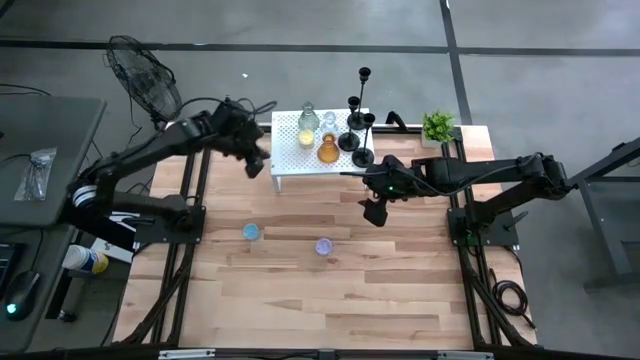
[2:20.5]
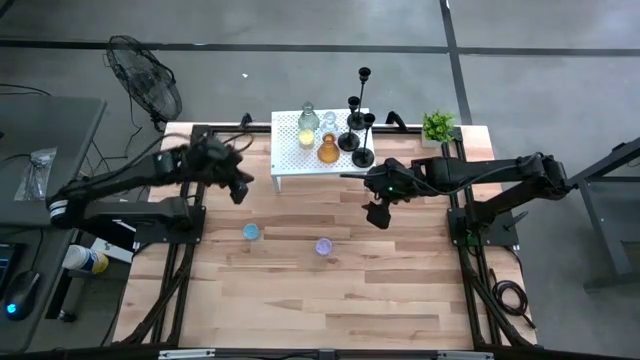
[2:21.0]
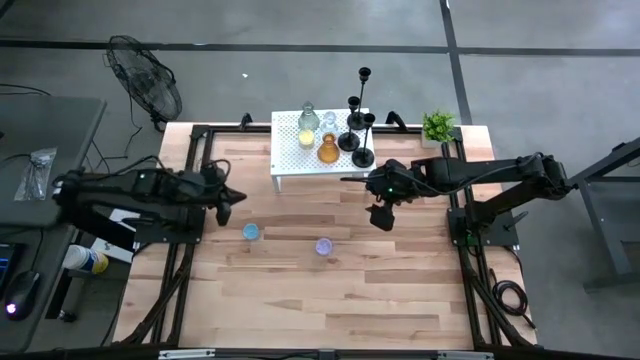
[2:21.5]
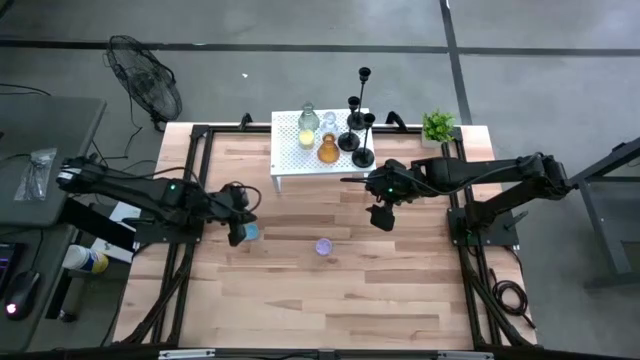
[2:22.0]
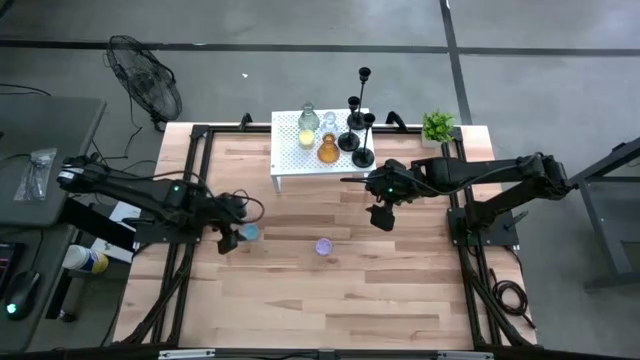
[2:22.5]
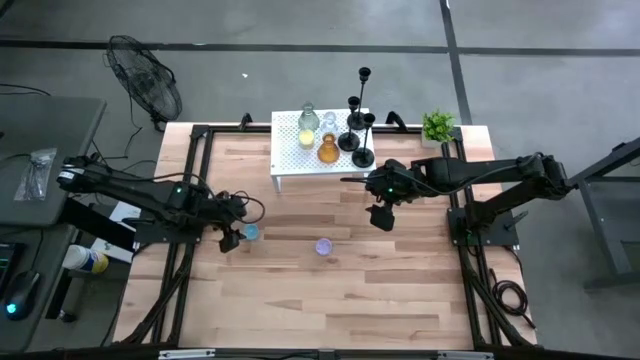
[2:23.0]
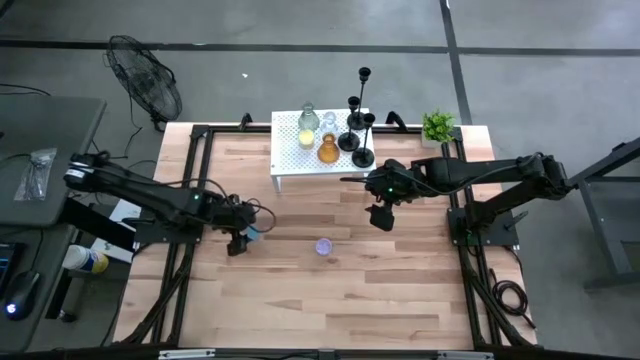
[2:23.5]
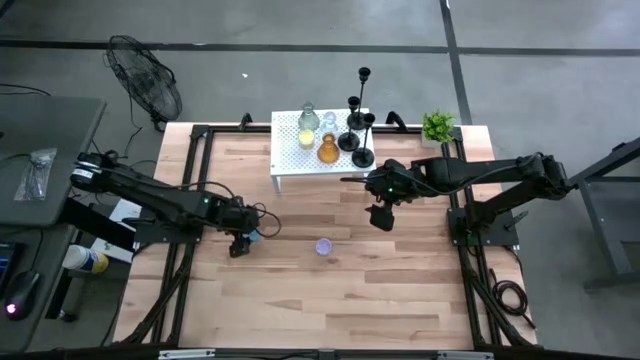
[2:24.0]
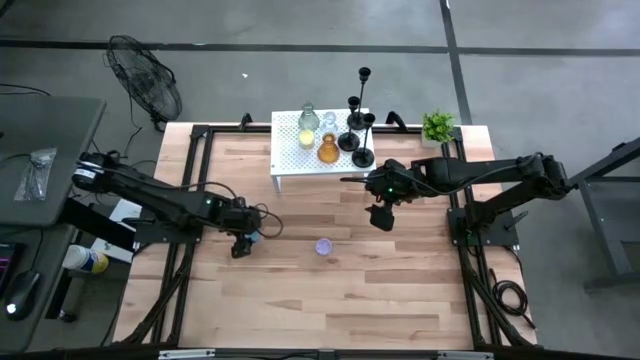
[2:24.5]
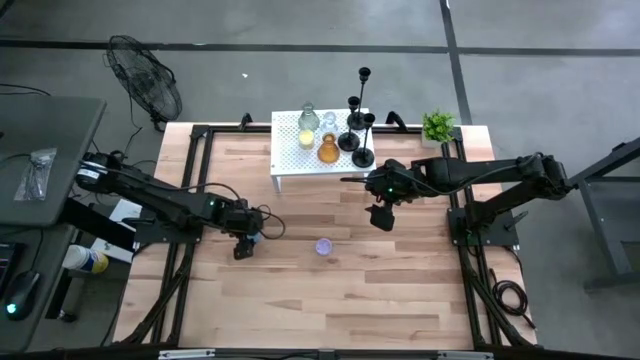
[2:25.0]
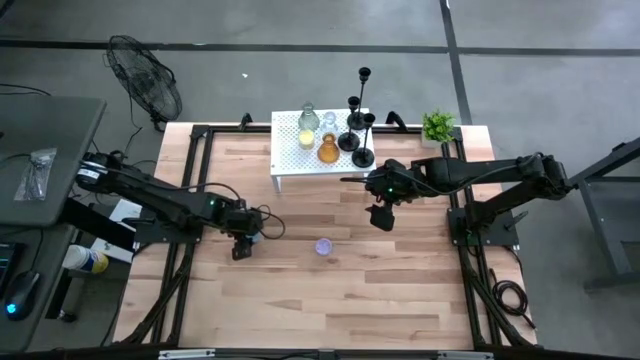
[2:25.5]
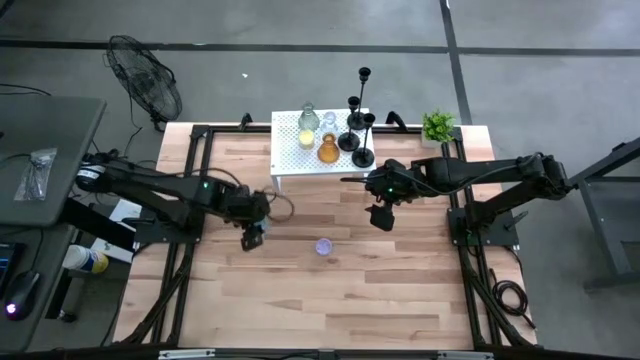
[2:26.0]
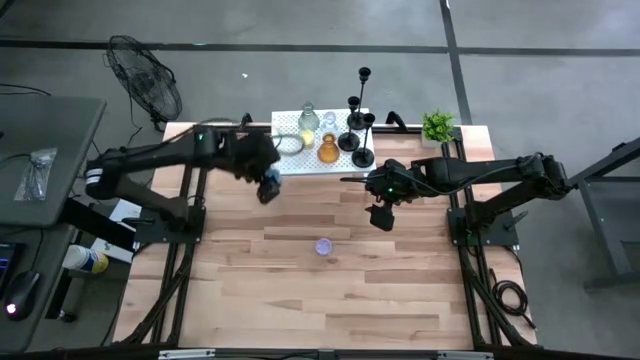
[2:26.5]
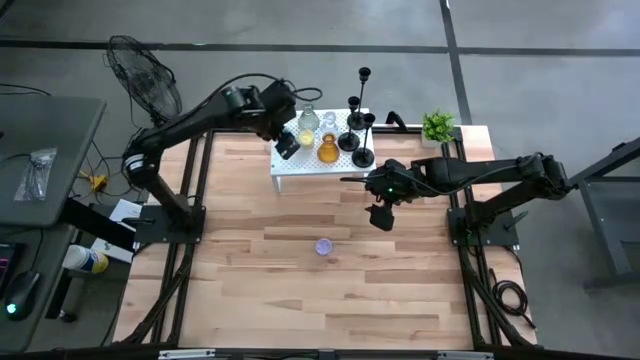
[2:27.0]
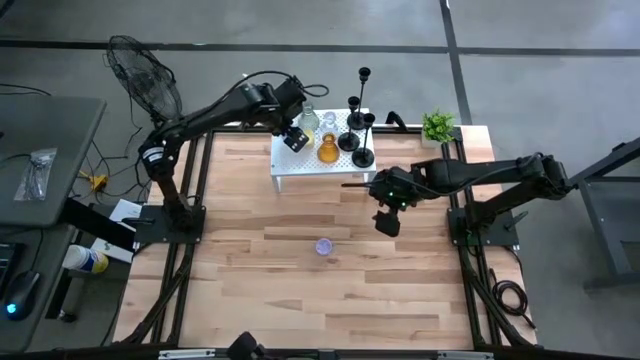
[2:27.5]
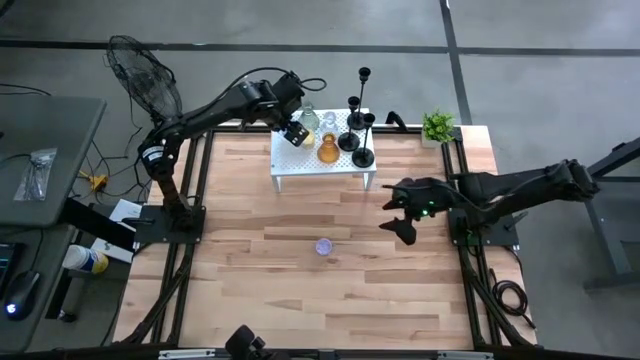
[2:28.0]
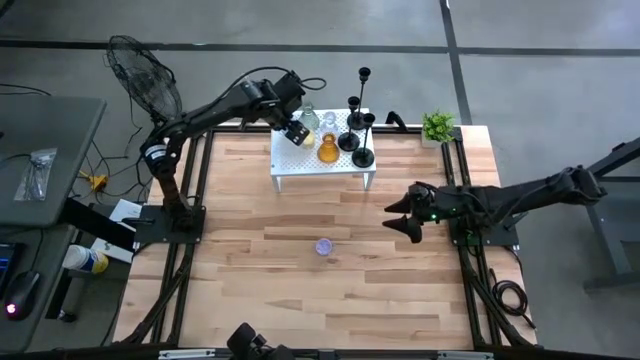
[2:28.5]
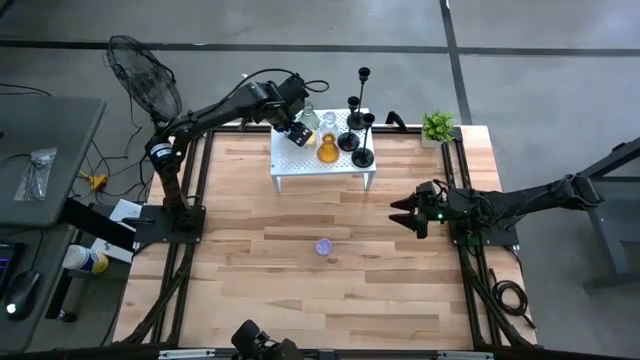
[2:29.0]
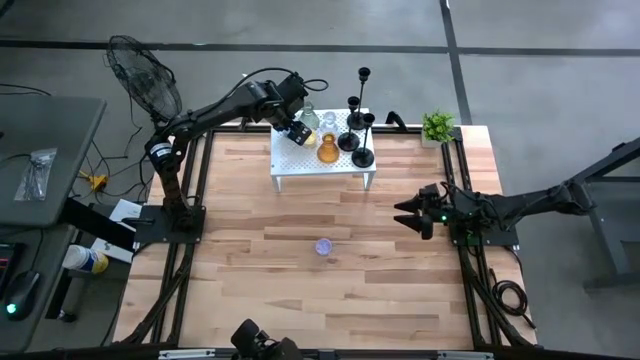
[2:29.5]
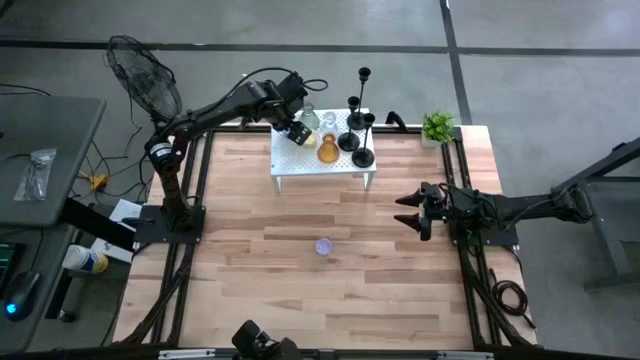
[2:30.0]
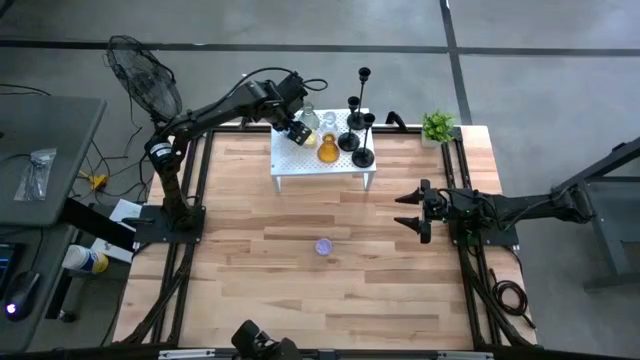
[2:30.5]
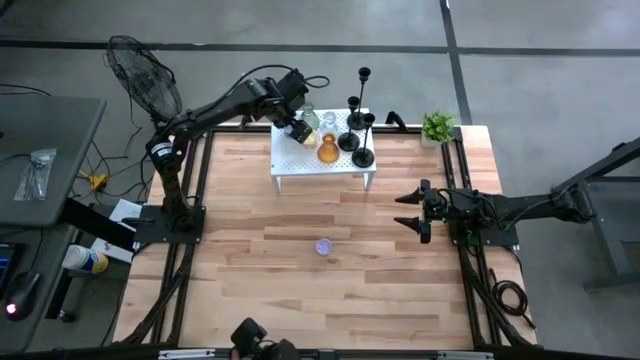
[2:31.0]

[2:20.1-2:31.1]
Task: Pick & Place candle stick holders
Put the blue scented candle on the shelf

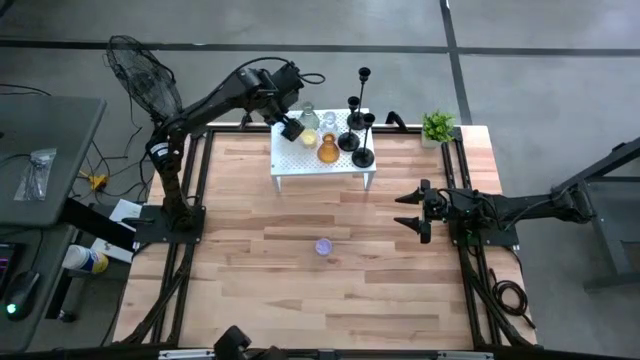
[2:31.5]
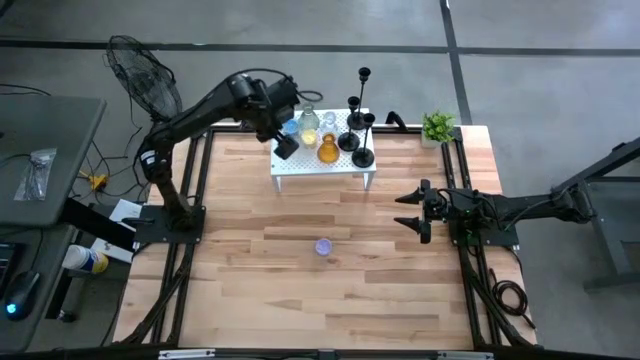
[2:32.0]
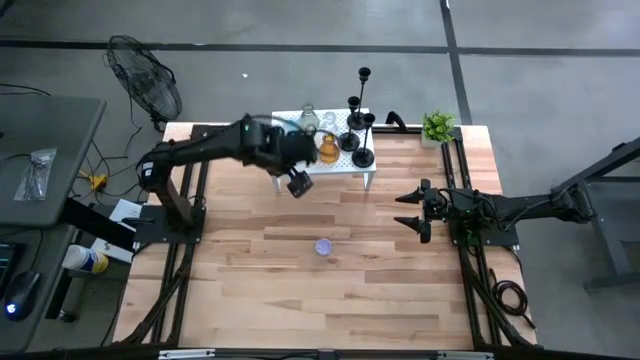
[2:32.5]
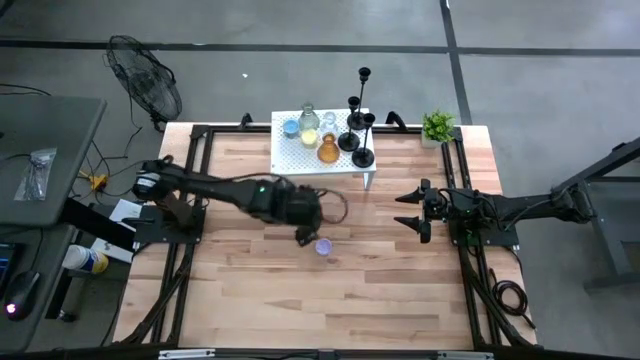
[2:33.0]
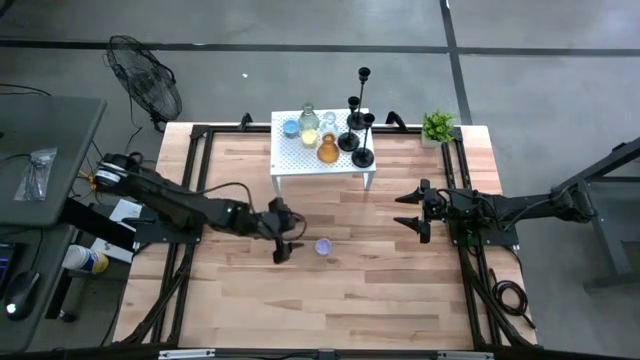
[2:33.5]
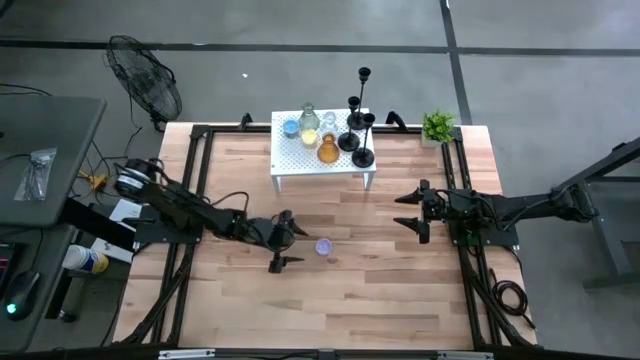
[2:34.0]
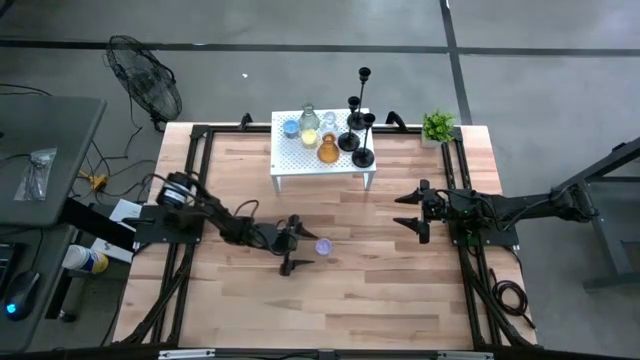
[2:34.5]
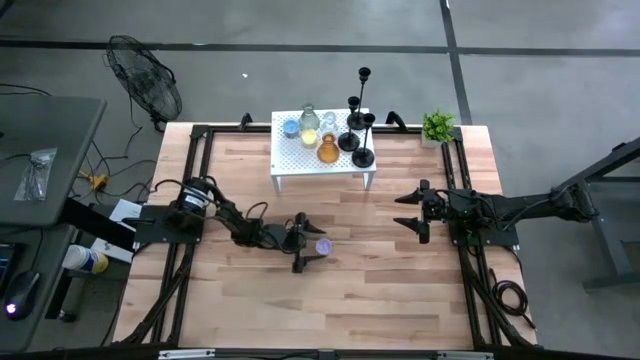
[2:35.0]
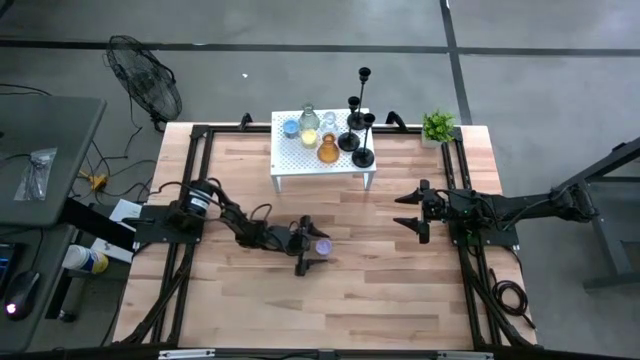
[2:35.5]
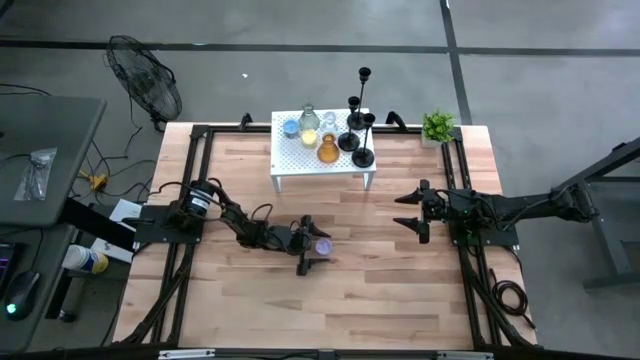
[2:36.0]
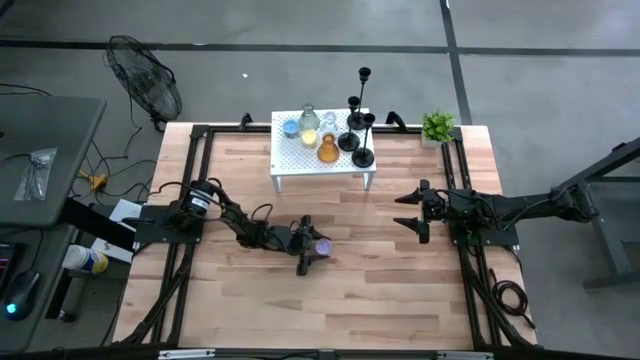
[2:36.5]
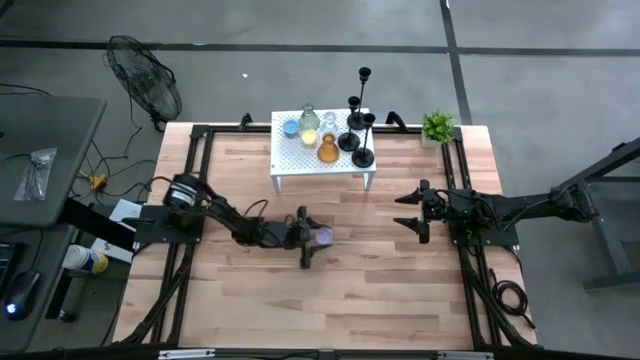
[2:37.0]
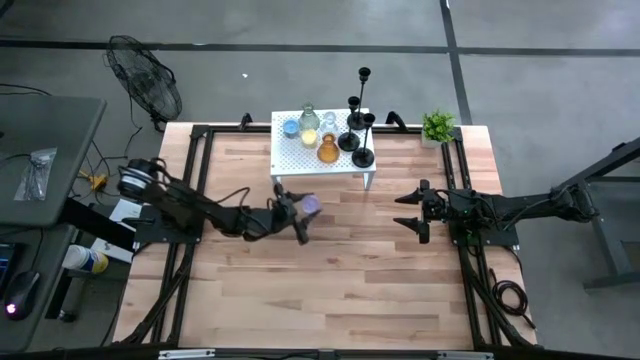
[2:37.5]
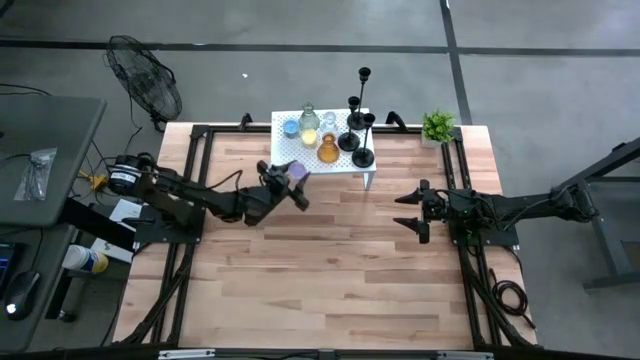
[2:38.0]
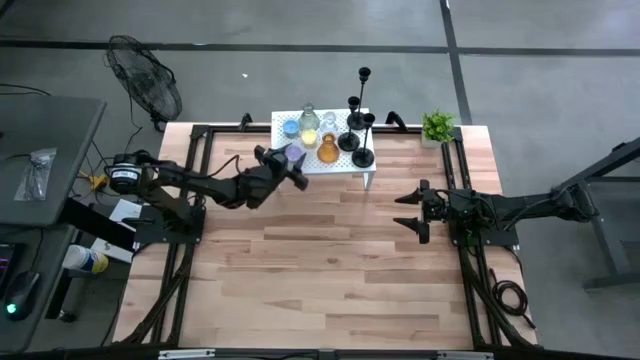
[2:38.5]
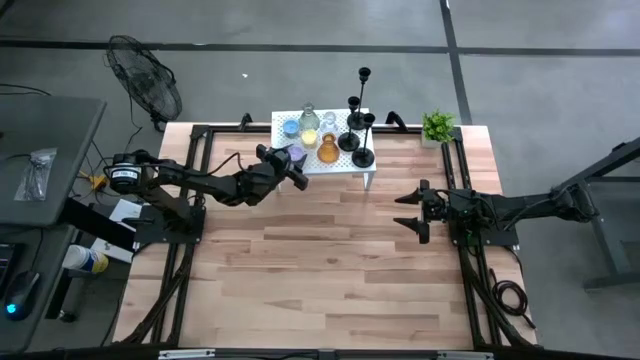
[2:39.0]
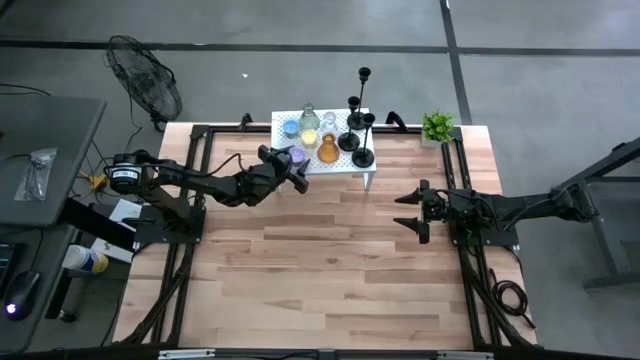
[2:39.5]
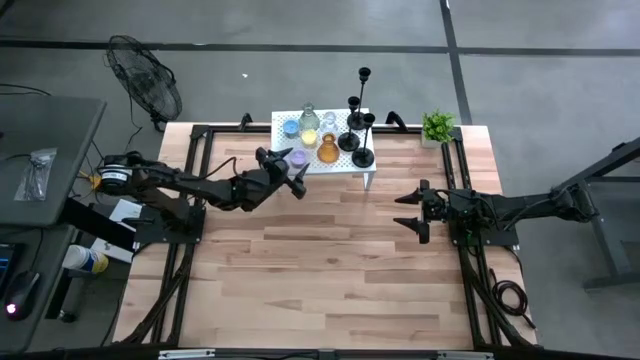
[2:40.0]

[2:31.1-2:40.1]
Put the violet scented candle on the shelf

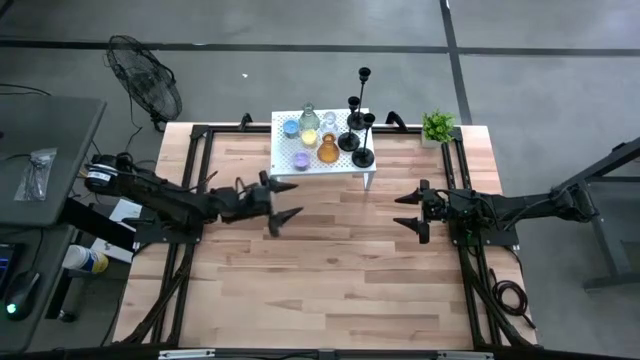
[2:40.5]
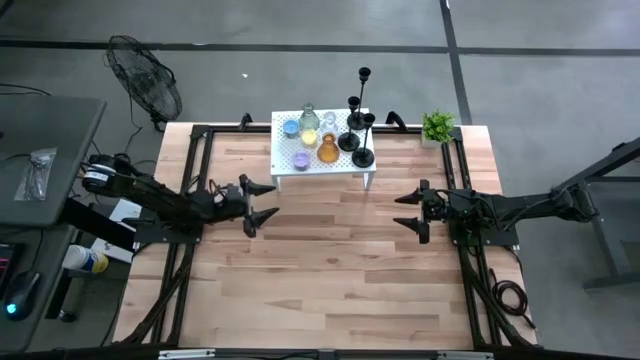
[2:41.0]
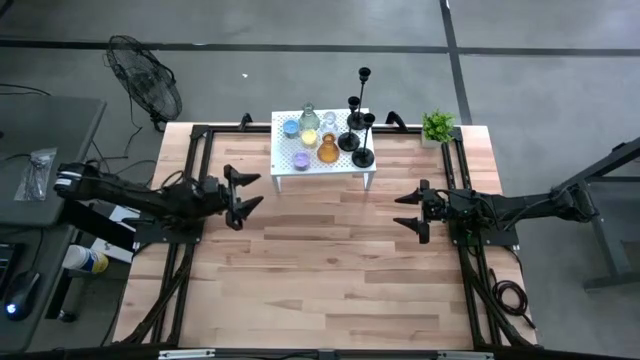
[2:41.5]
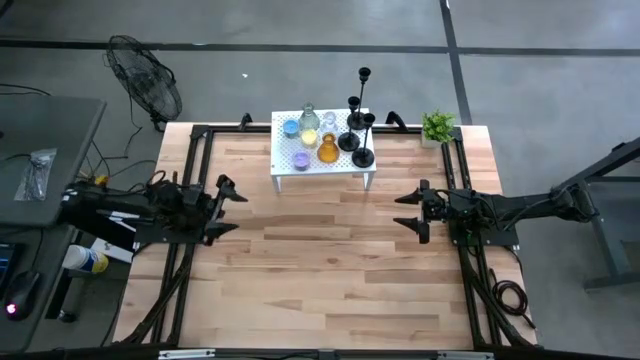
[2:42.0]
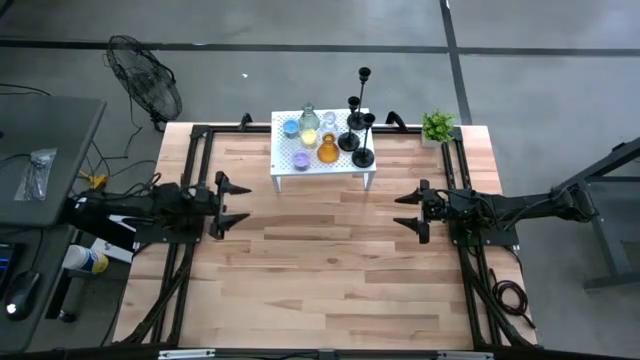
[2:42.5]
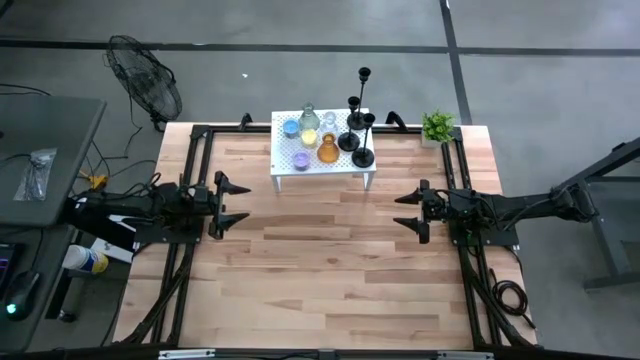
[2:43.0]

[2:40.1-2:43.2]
Return to Home Position
